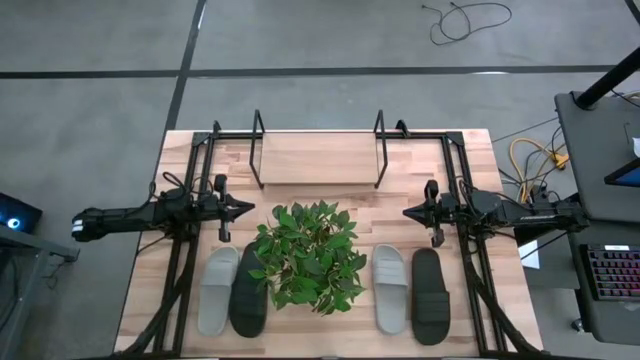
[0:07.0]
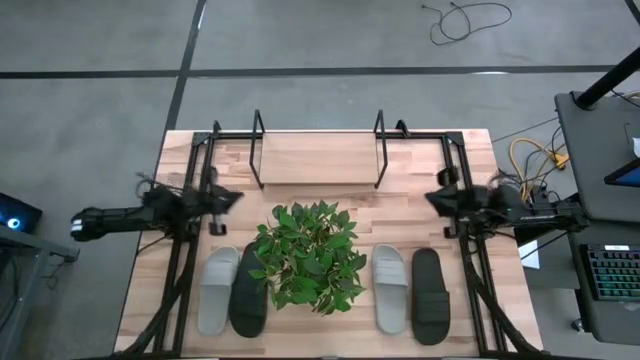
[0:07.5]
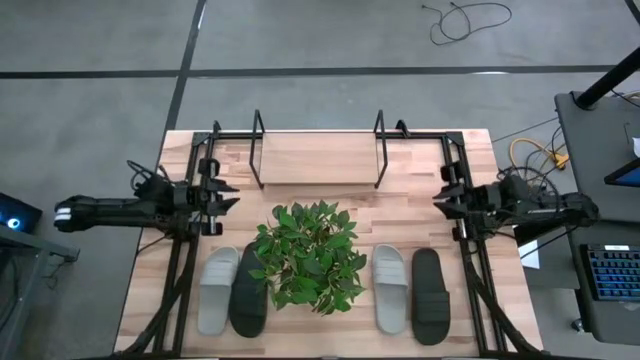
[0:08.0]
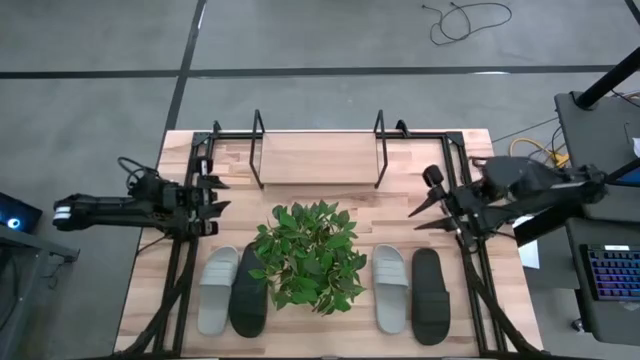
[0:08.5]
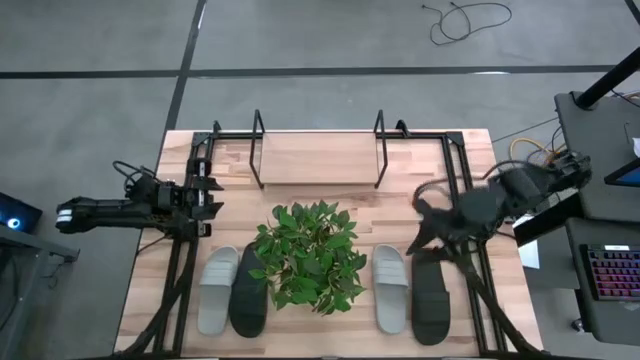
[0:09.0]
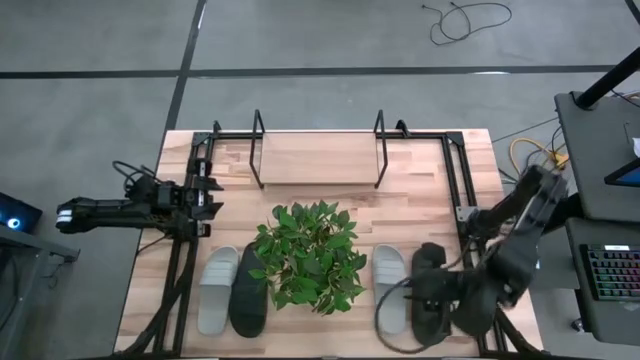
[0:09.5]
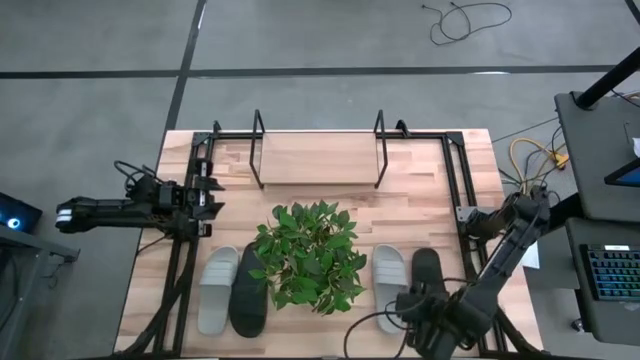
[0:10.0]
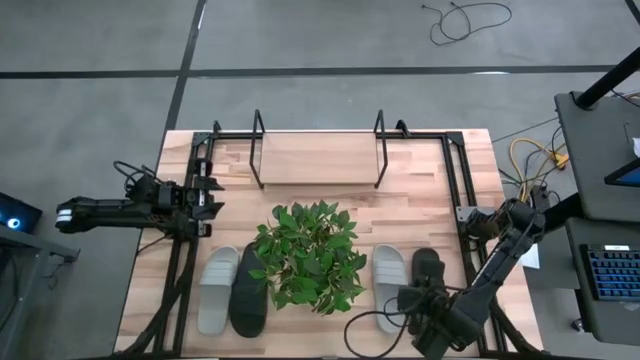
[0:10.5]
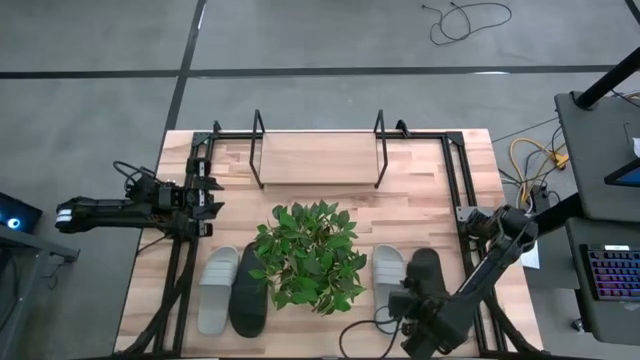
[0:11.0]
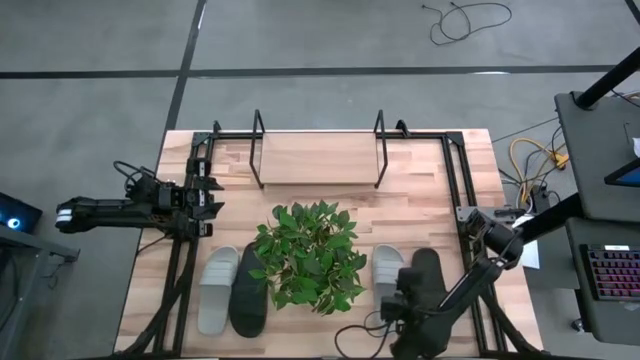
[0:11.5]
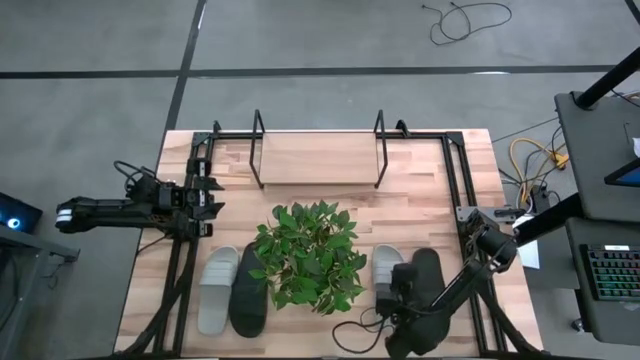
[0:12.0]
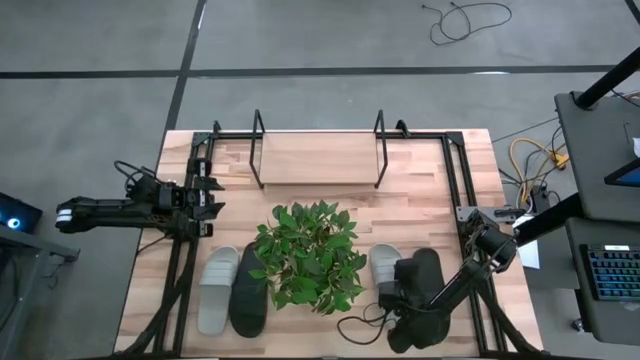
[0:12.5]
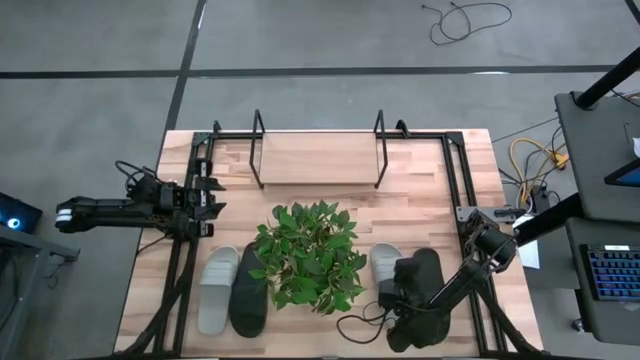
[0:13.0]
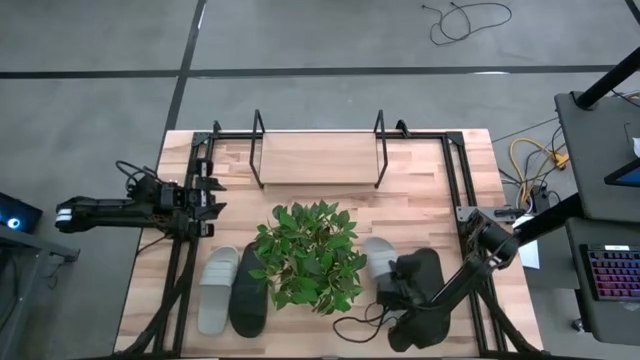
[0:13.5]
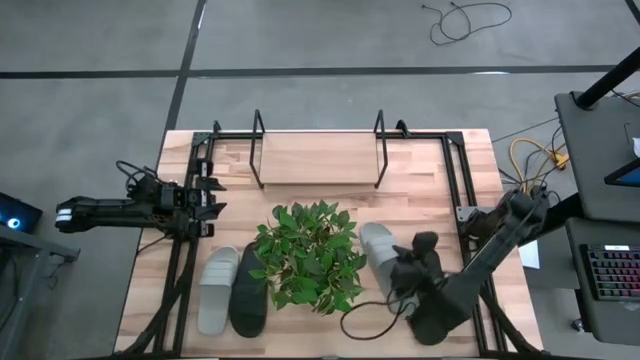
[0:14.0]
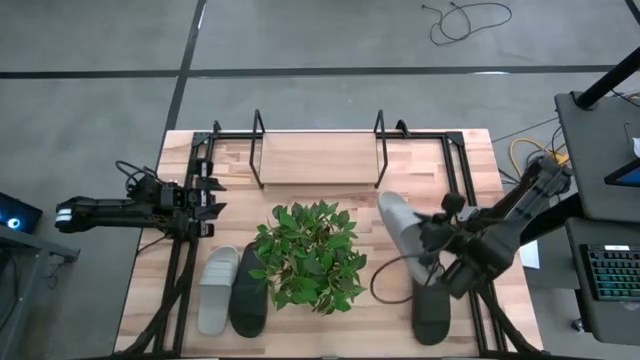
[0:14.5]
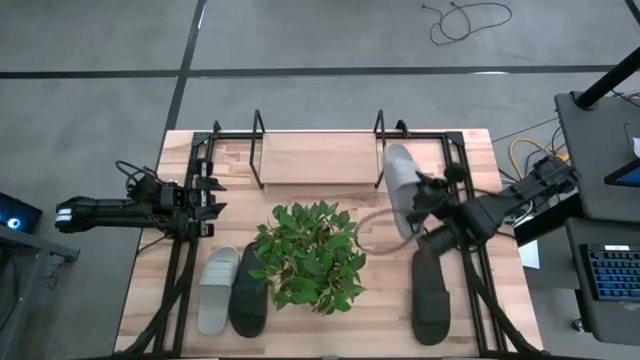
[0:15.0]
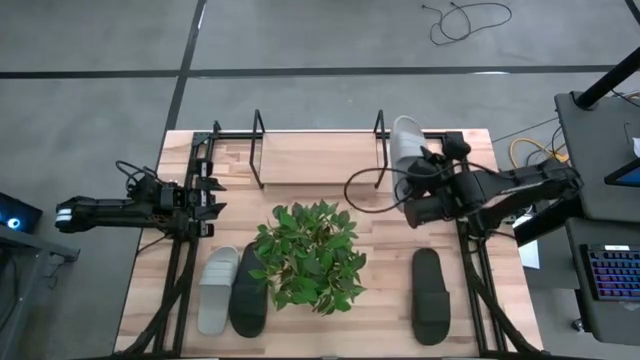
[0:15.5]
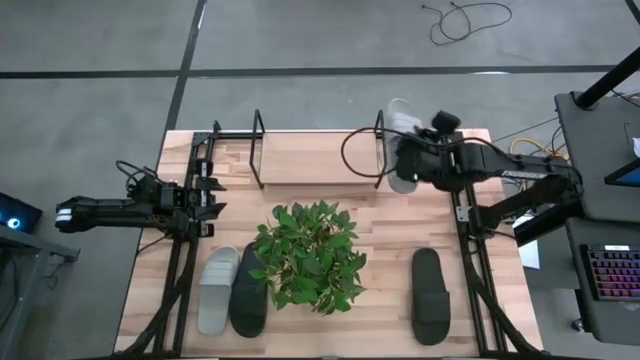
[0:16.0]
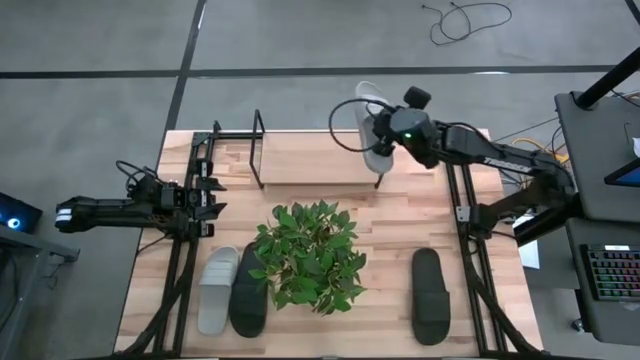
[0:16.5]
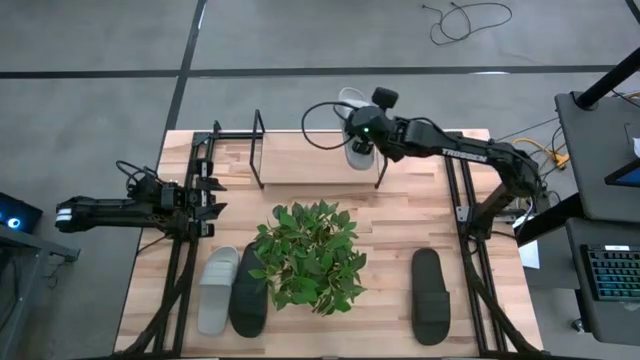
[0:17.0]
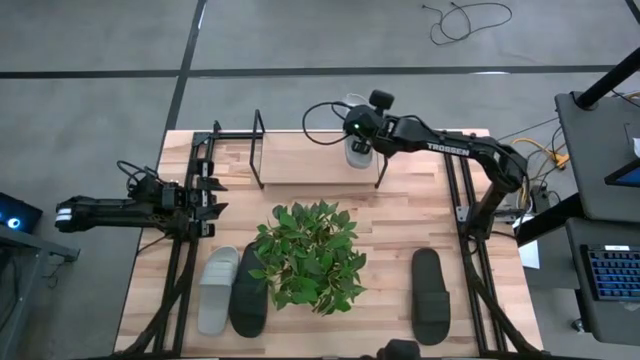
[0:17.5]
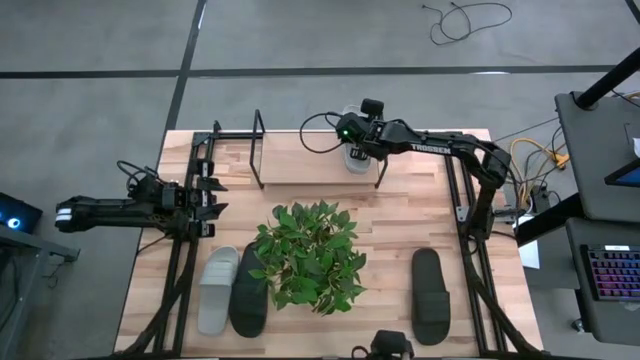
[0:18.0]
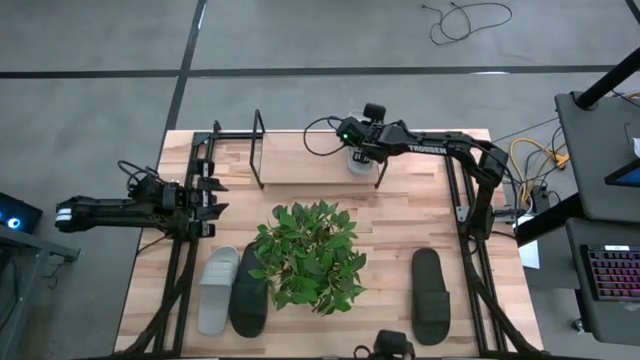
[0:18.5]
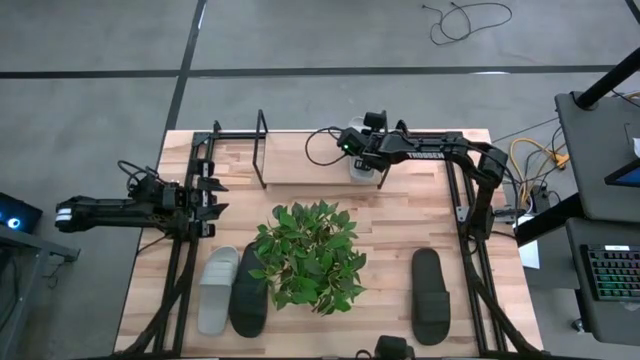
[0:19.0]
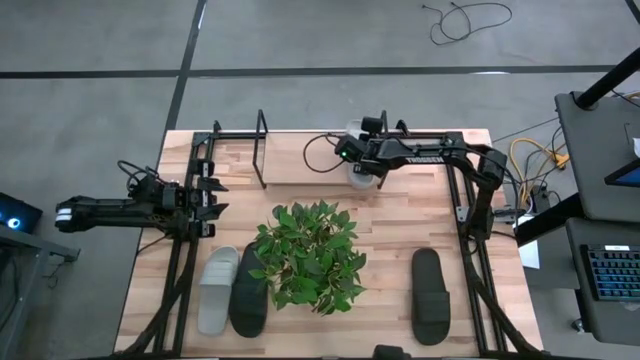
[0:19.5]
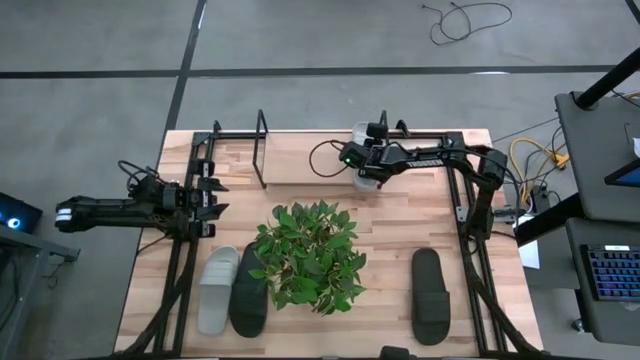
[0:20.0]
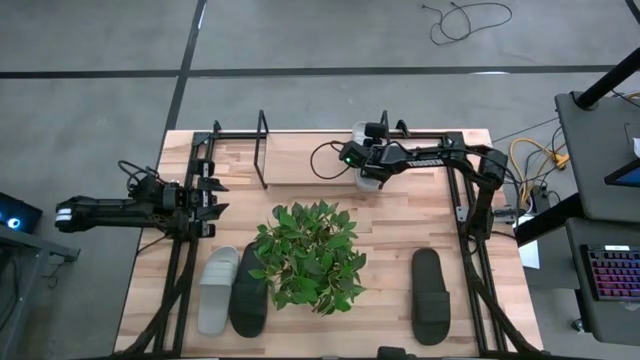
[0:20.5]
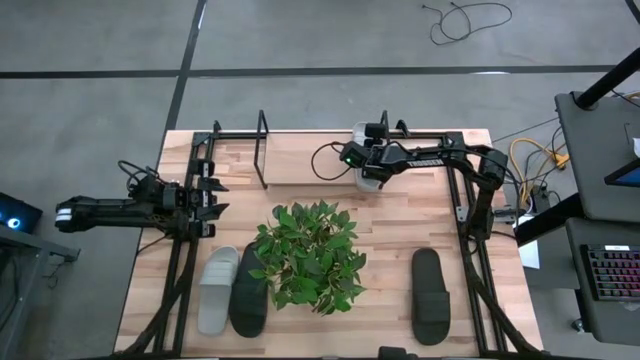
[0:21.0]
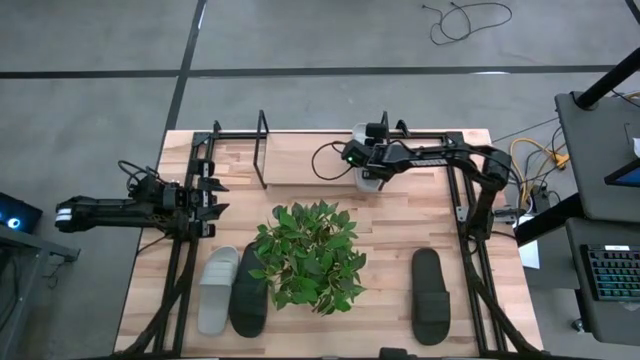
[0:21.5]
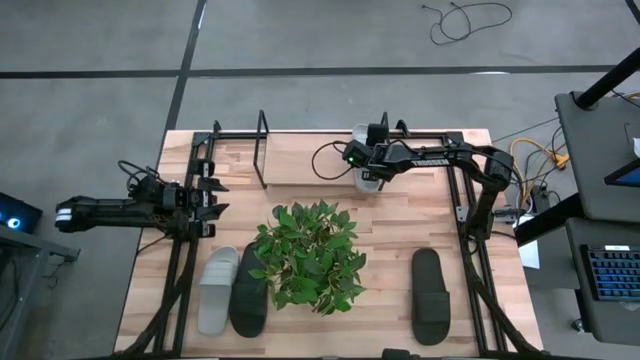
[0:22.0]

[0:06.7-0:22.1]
Task: Pick and place slides into the shelf
Put the right gray slide on the shelf

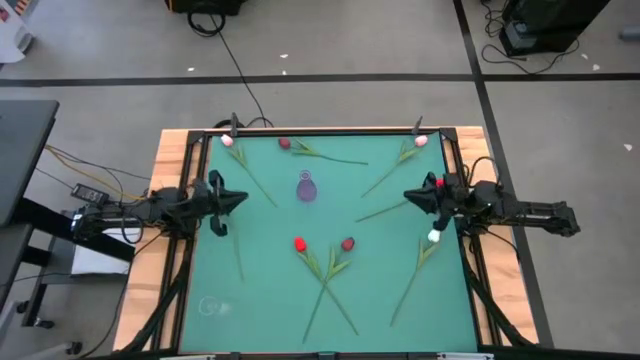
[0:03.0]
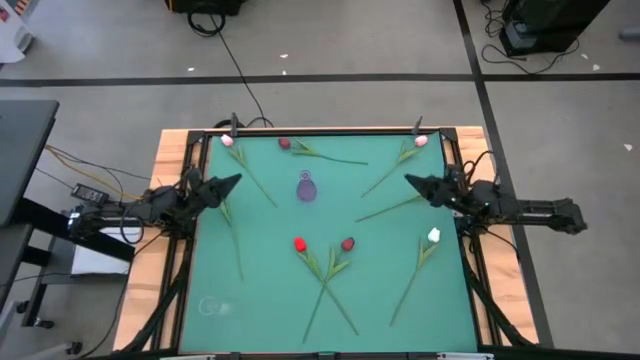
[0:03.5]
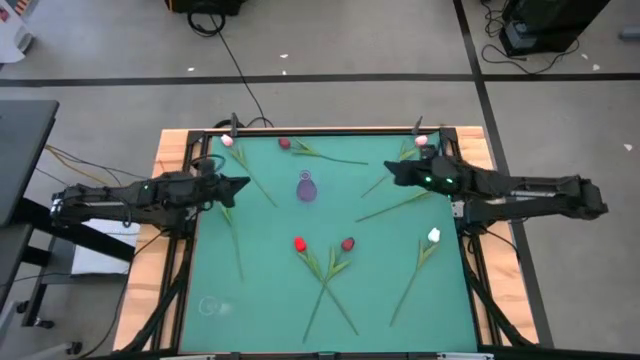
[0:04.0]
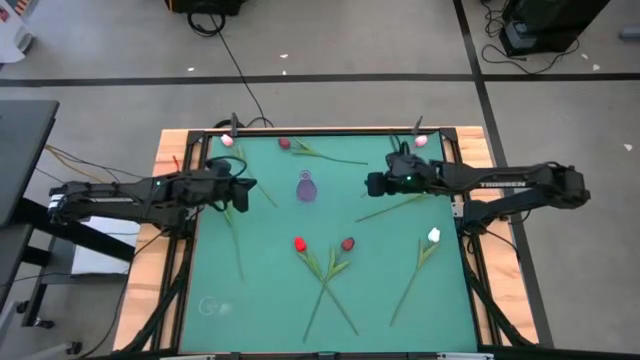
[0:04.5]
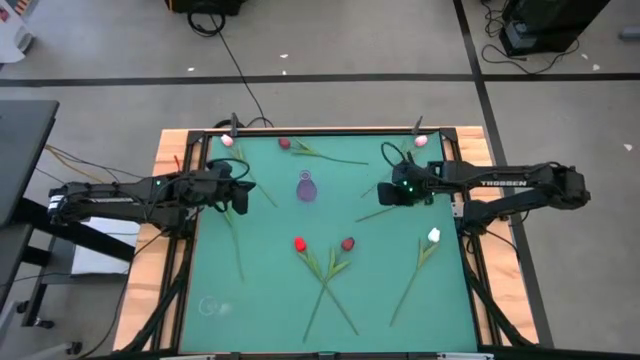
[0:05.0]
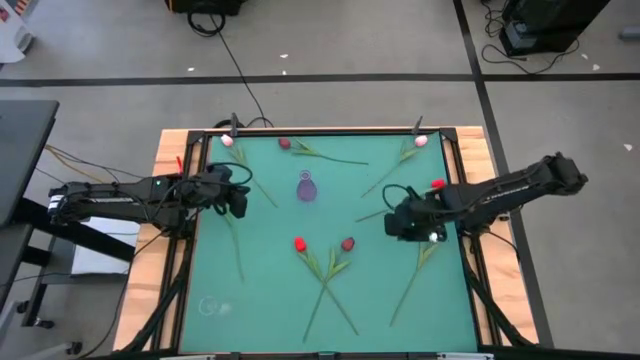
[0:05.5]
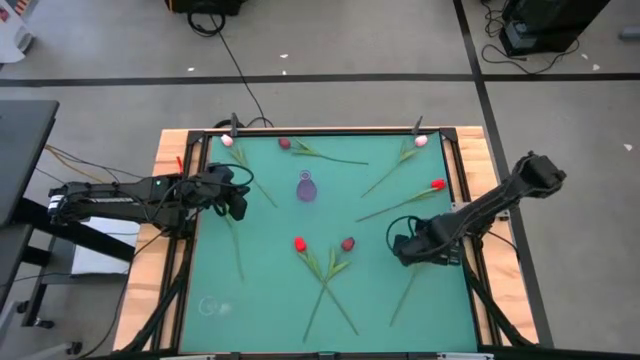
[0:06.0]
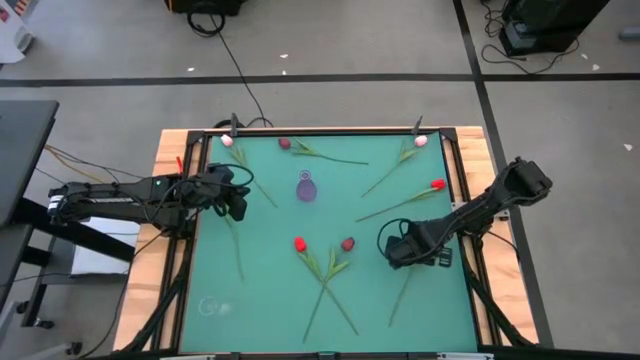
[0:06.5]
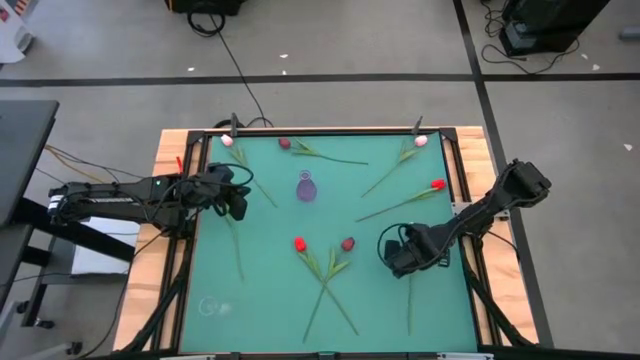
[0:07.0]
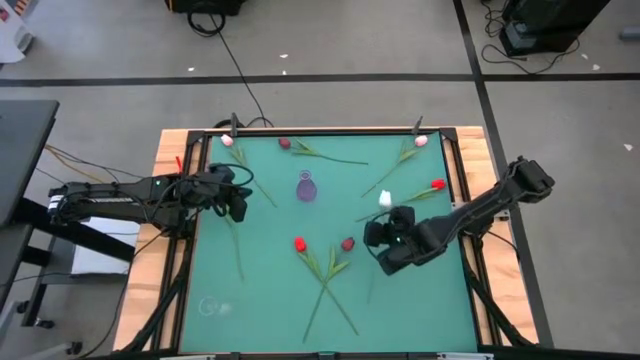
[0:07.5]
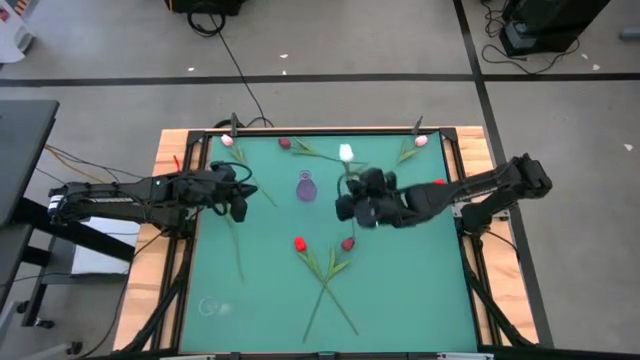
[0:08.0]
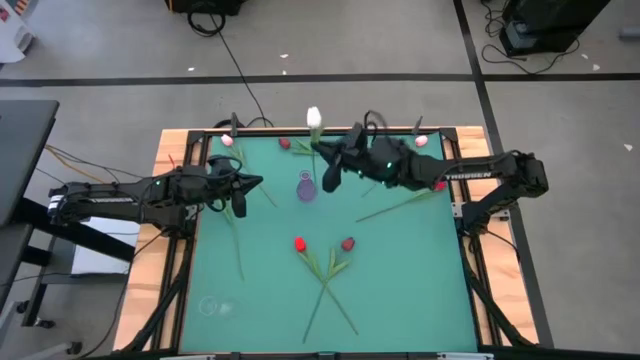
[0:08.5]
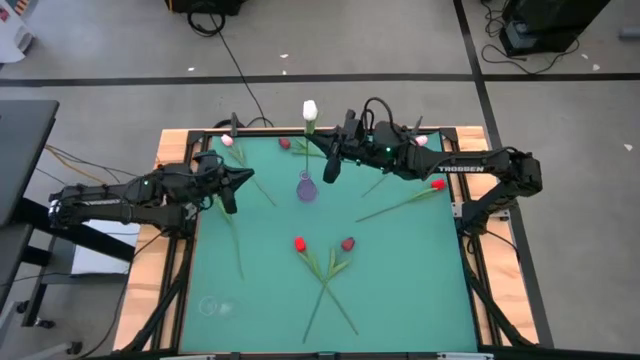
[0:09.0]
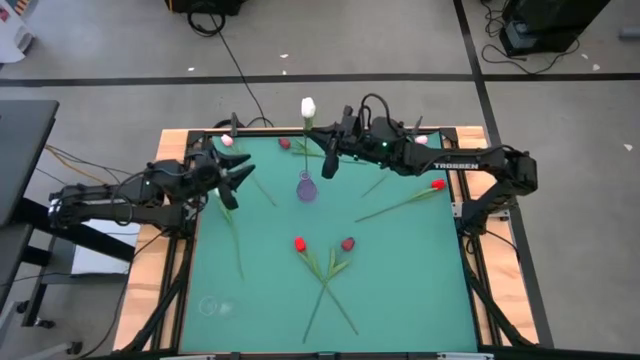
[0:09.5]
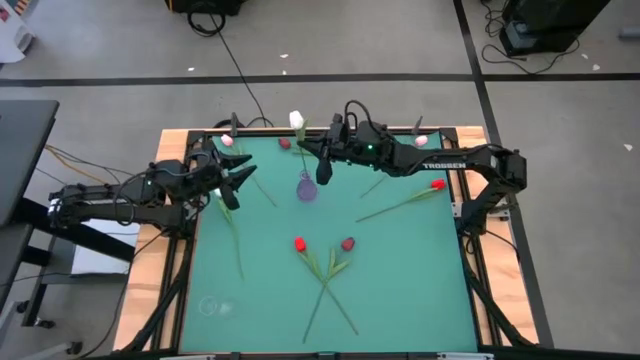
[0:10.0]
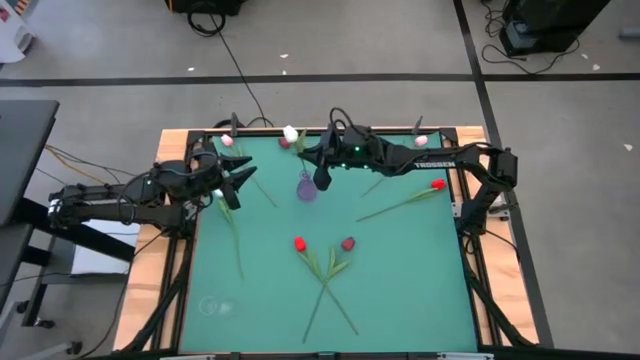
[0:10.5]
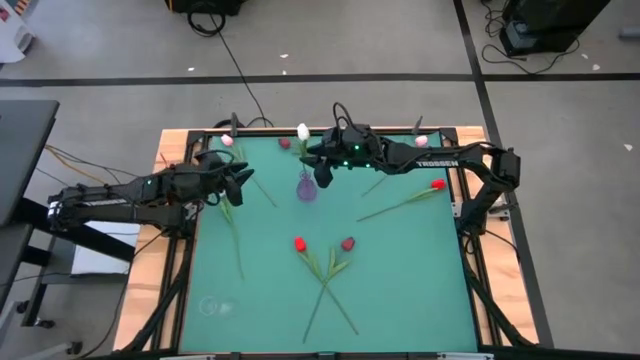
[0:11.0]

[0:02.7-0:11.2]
Task: Sort flowers into vase by color
Put the right white tulip into the purple vase
